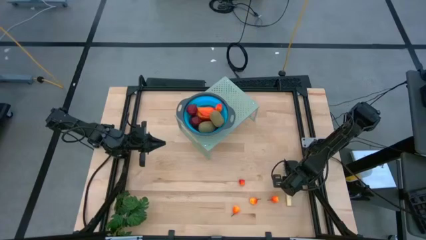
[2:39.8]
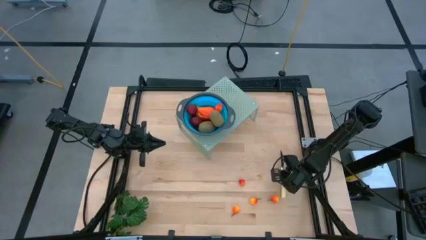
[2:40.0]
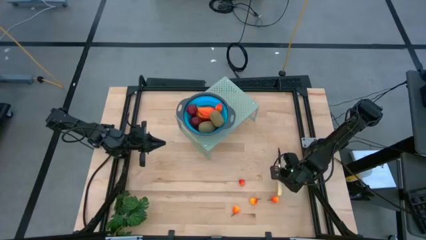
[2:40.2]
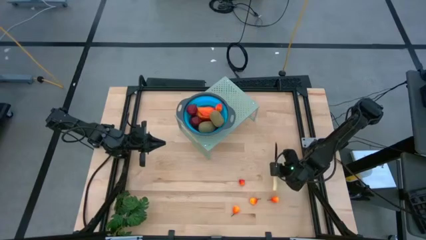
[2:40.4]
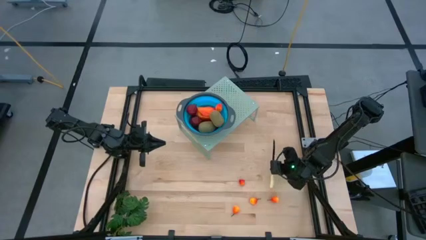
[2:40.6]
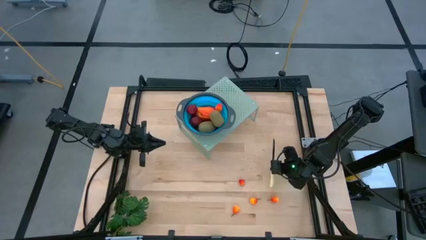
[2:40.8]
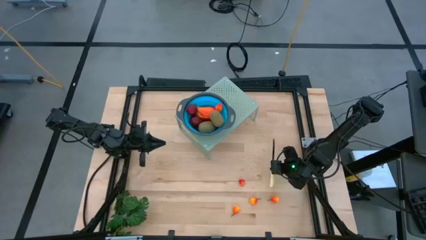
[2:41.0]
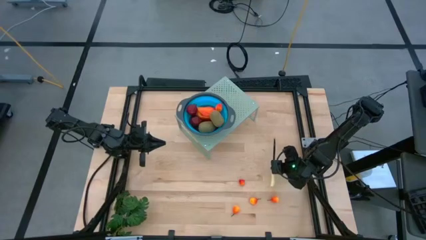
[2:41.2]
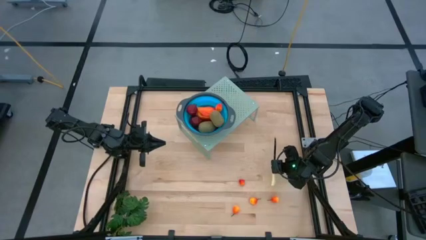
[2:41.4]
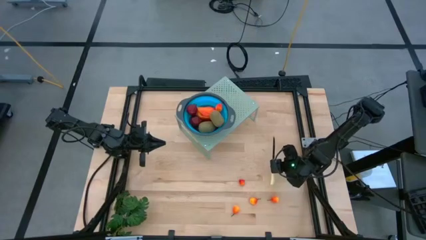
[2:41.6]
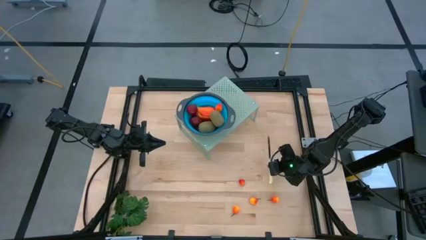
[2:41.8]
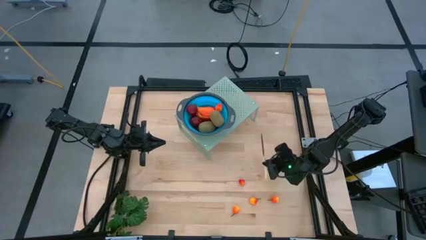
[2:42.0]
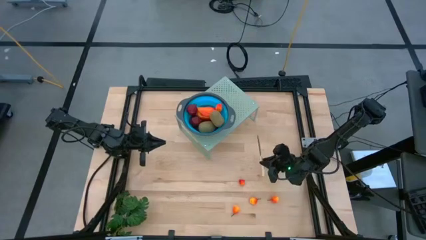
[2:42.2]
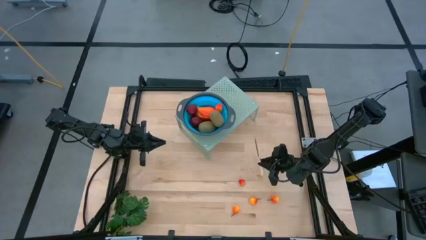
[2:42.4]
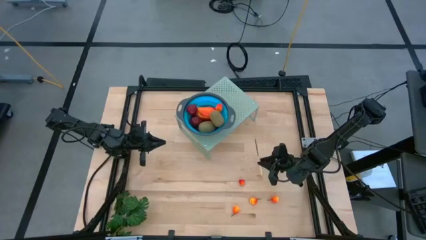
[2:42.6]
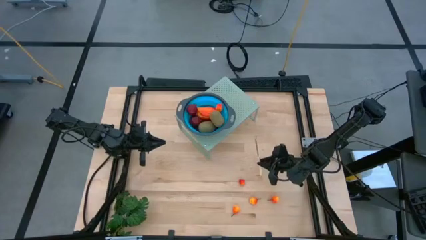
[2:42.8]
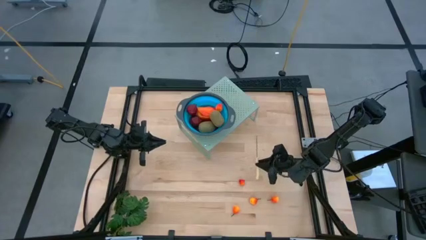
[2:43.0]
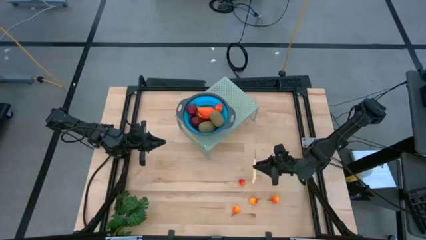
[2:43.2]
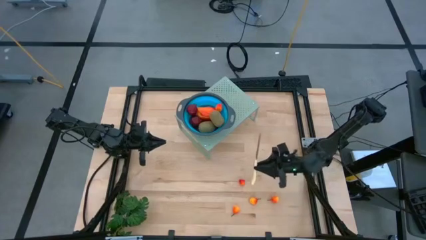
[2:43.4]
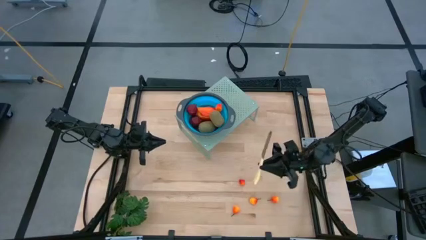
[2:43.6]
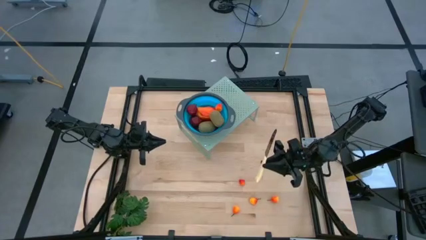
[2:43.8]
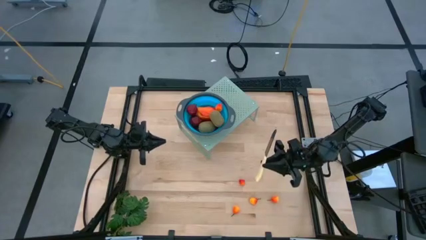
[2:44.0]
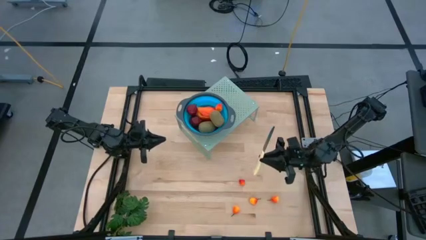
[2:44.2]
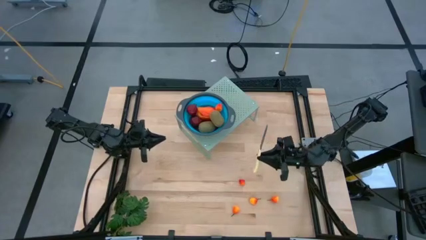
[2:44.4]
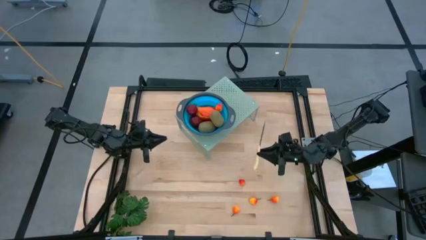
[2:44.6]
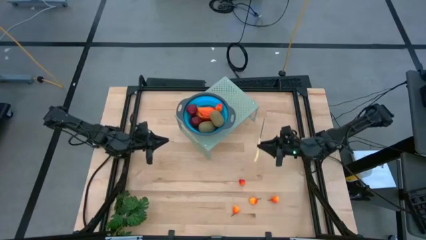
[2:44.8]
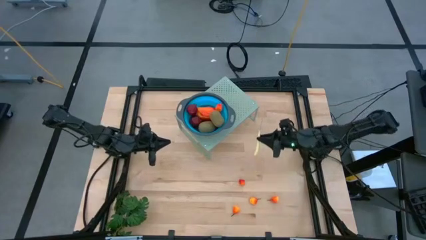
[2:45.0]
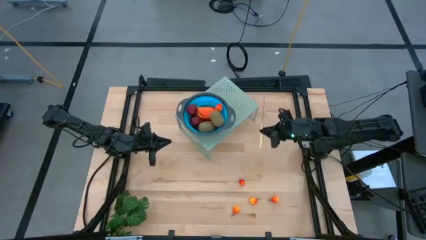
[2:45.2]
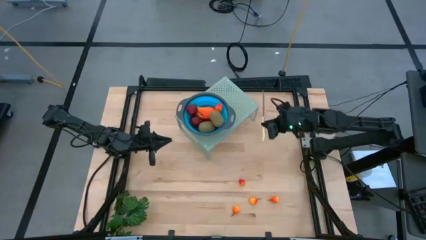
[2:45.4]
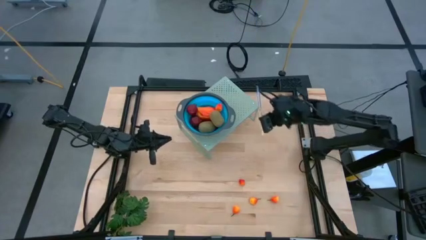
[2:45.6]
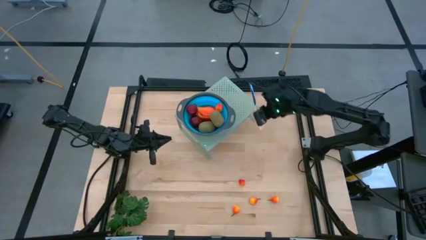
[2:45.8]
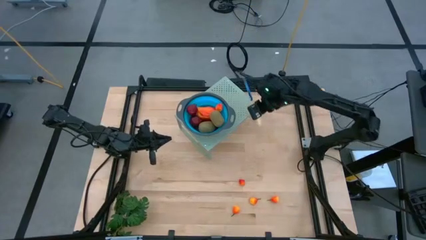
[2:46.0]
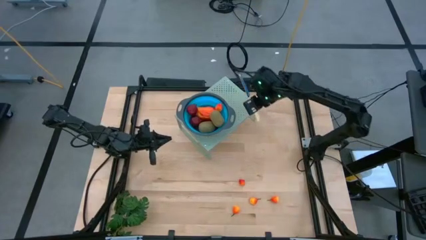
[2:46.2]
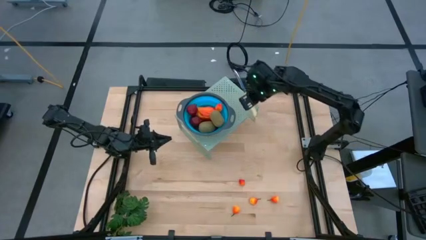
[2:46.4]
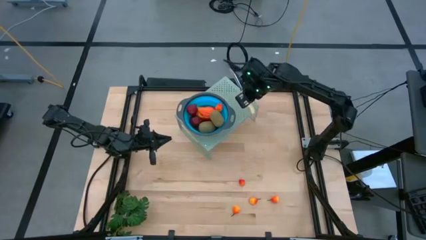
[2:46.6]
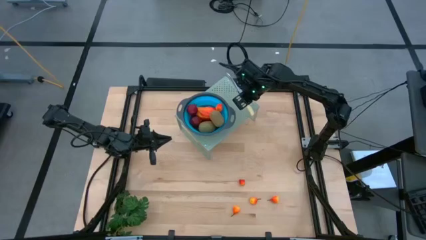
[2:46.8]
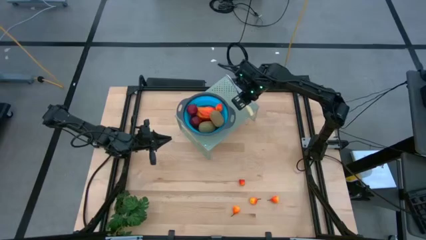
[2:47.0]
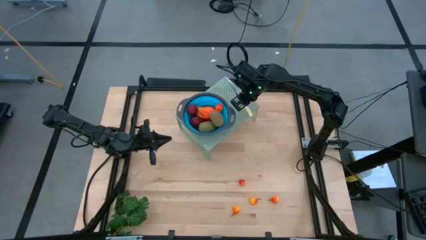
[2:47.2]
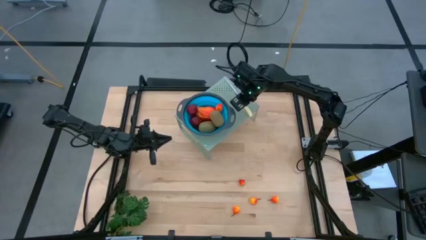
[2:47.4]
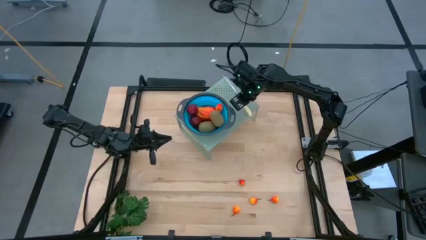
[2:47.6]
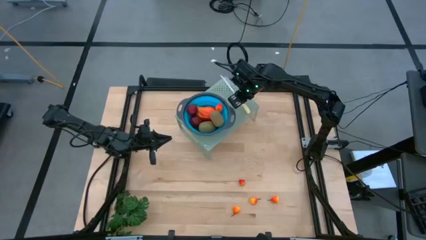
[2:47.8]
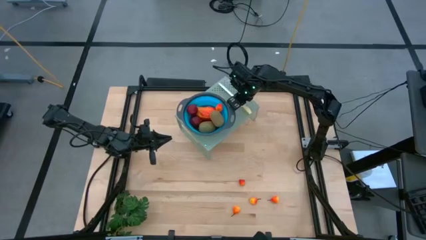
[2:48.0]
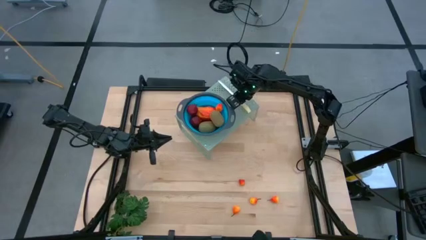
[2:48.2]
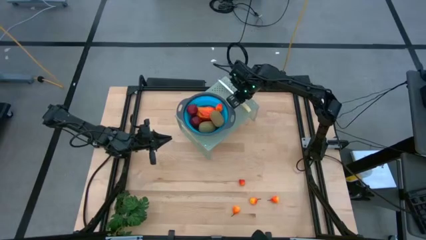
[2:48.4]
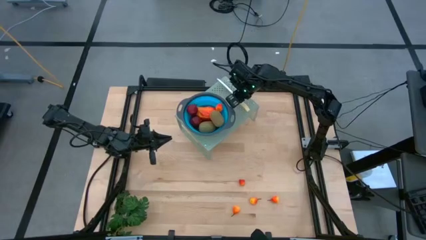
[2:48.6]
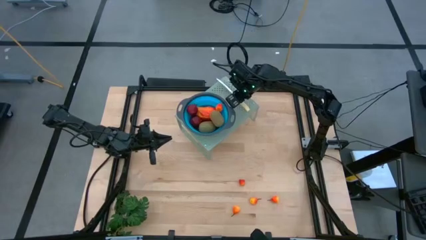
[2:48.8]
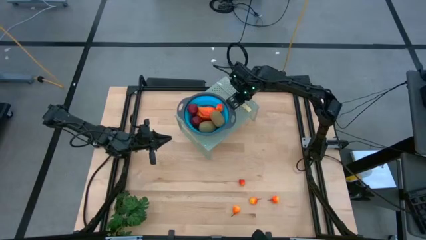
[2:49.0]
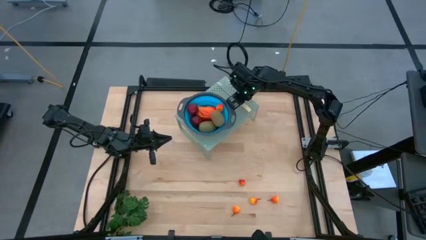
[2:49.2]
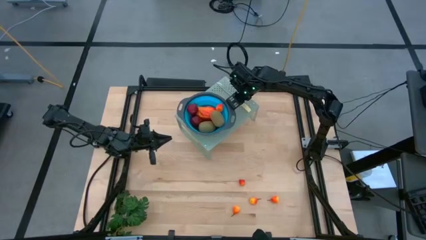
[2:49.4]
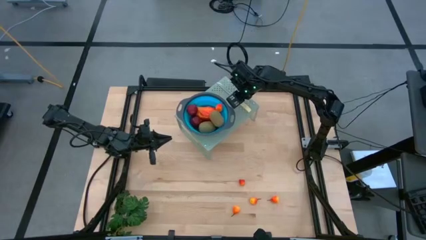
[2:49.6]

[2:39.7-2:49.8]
Task: Pick & Place Fruit
Put the knife on the shelf
